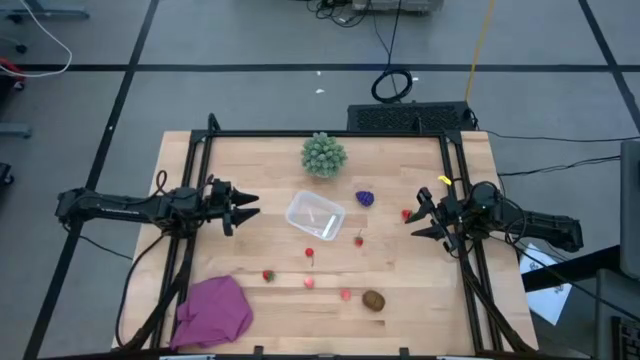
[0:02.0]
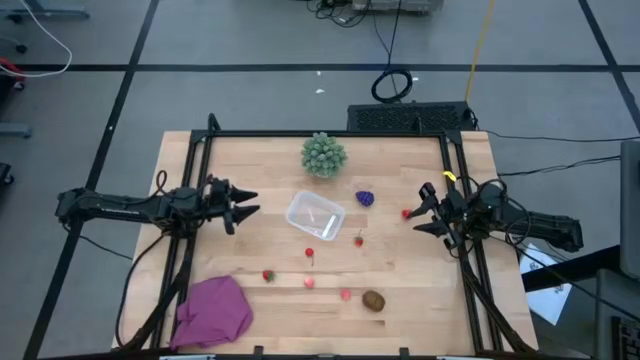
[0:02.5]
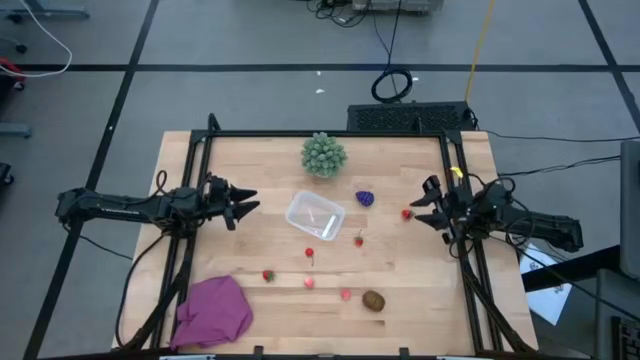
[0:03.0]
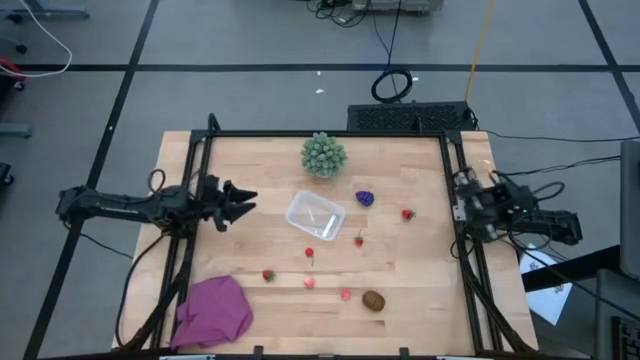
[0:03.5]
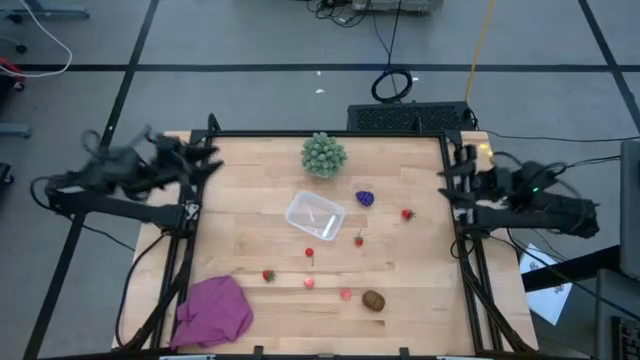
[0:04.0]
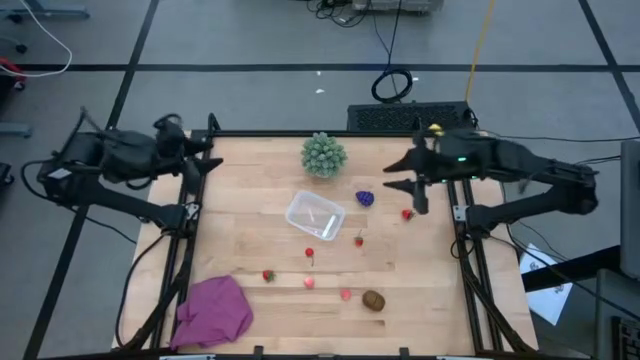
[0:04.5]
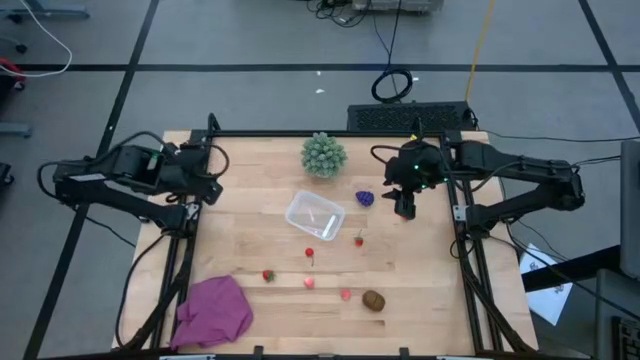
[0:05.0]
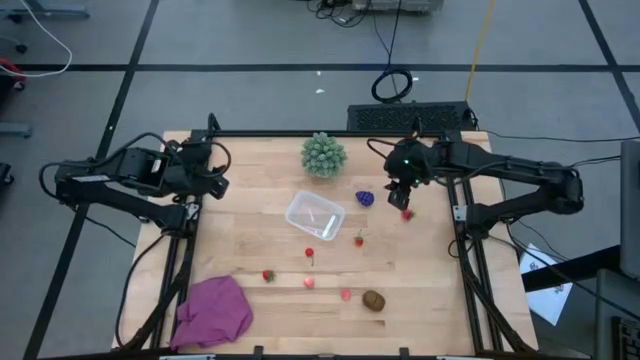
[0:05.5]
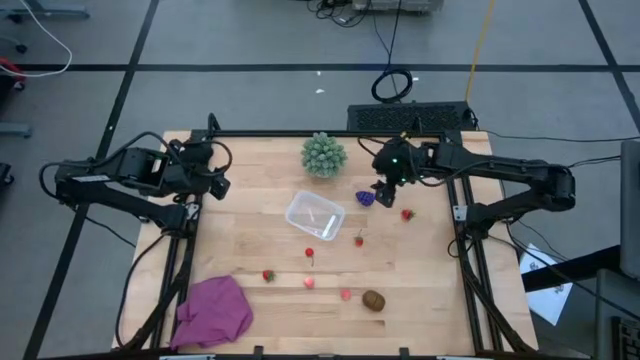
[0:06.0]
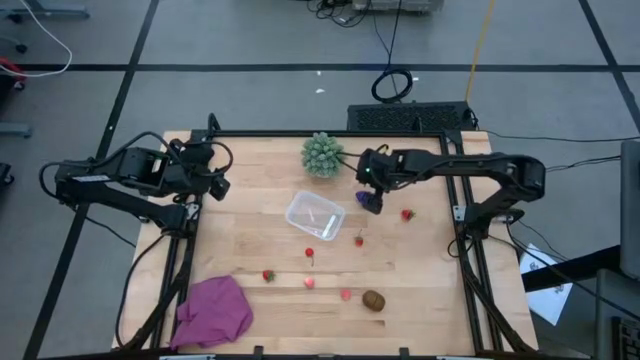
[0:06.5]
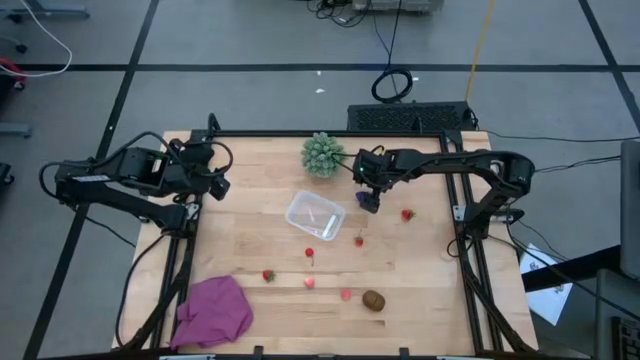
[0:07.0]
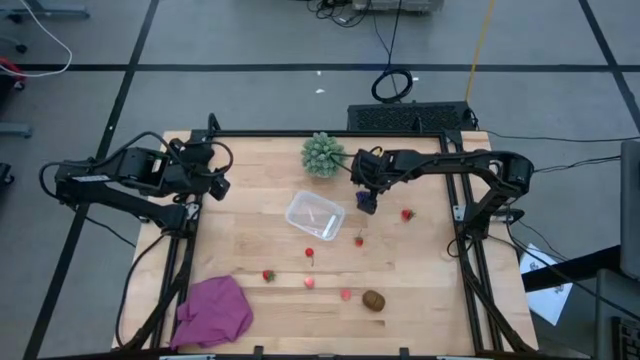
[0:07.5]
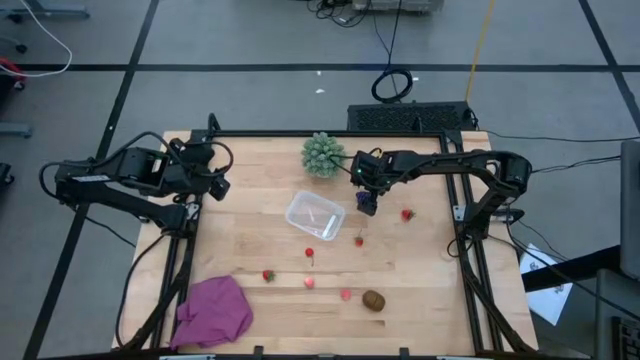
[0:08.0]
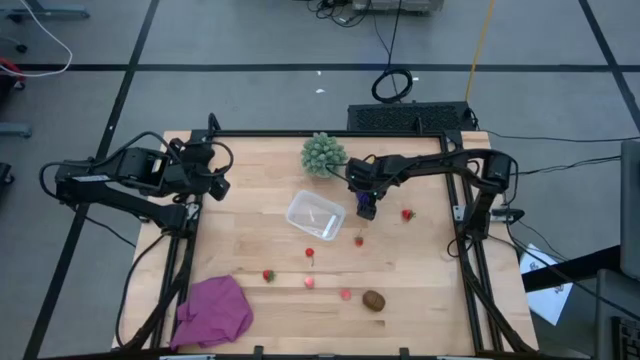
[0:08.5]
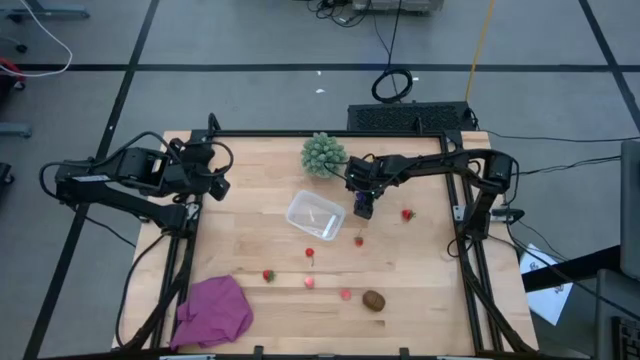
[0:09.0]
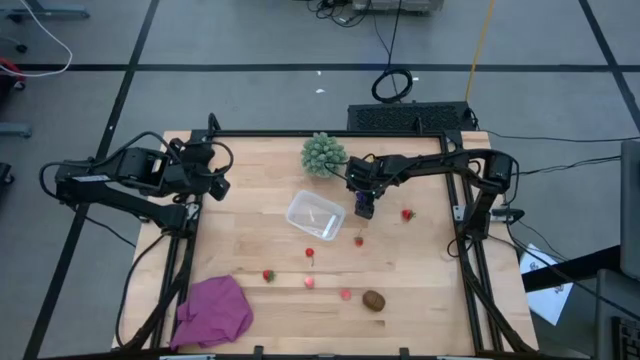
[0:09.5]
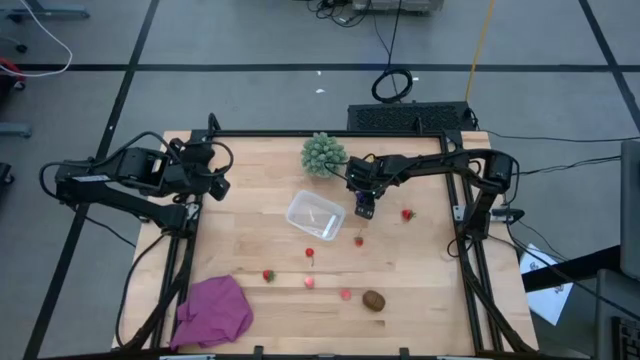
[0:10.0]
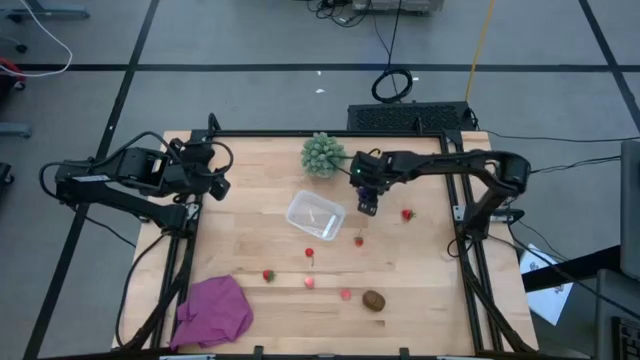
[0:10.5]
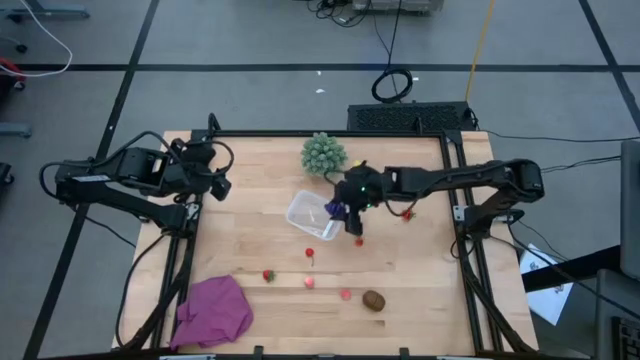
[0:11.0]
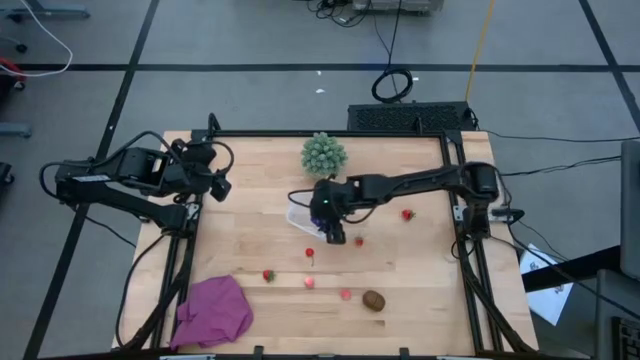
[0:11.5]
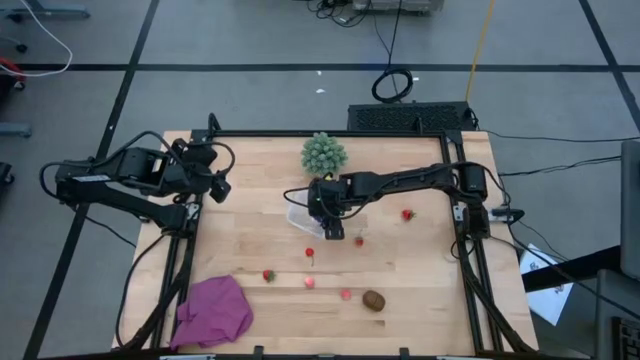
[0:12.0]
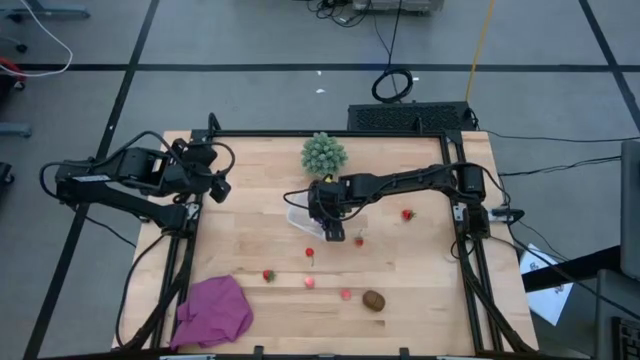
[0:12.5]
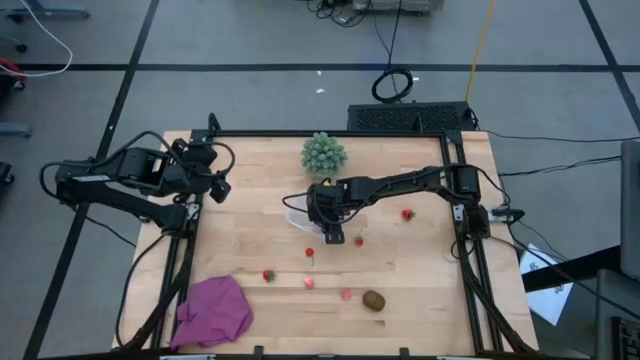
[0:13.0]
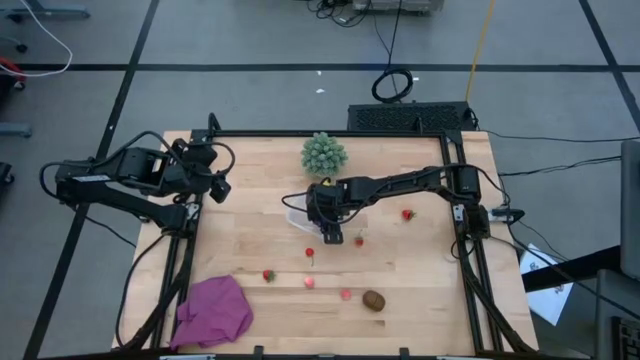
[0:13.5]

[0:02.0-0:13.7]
Task: Pick and placing Produce into tupperware
Put the grape into the transparent bin

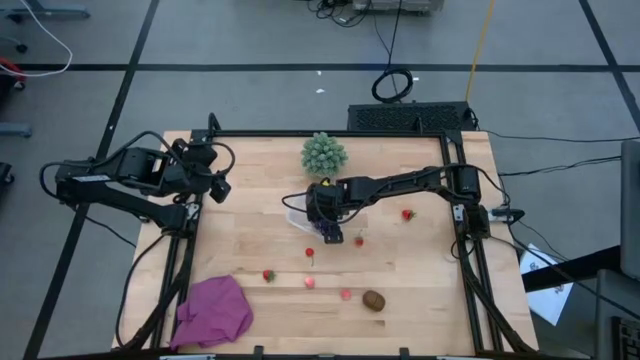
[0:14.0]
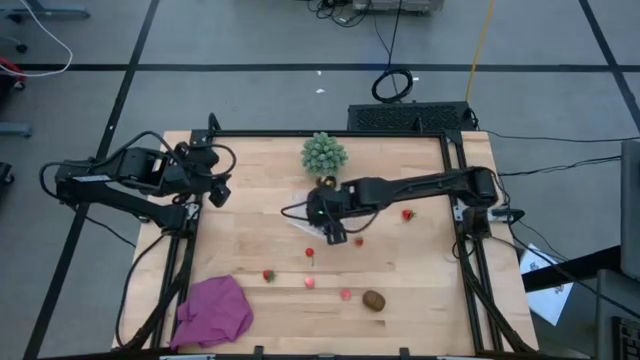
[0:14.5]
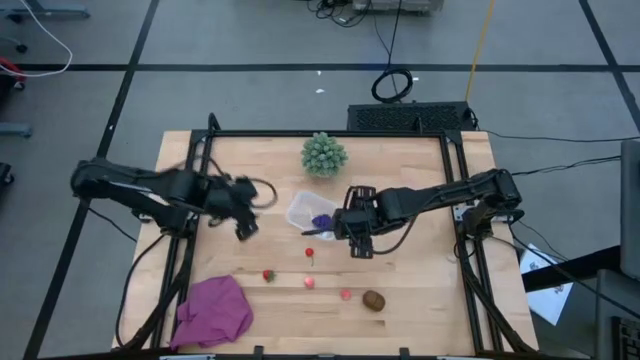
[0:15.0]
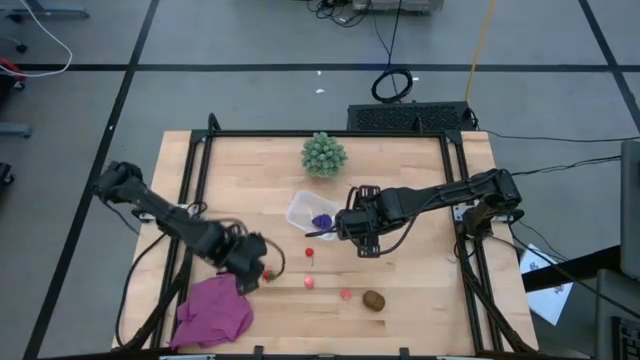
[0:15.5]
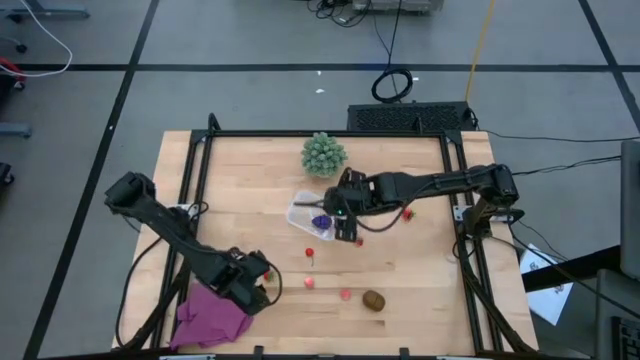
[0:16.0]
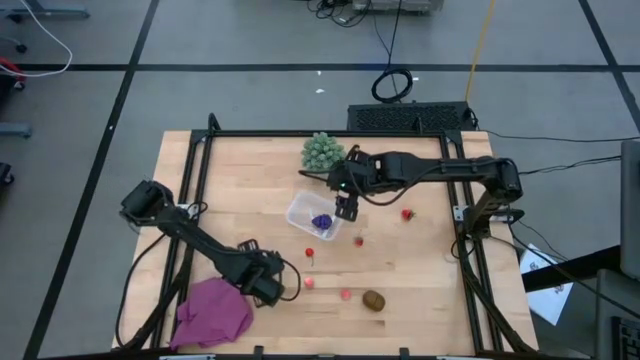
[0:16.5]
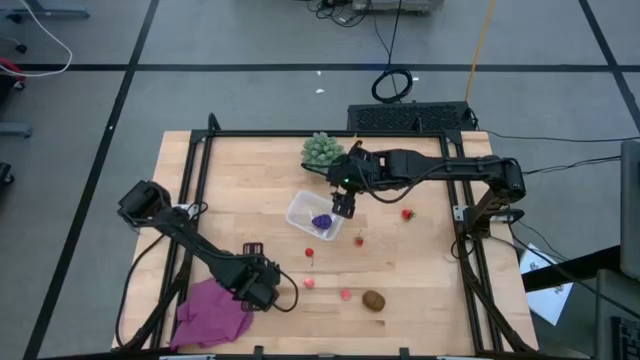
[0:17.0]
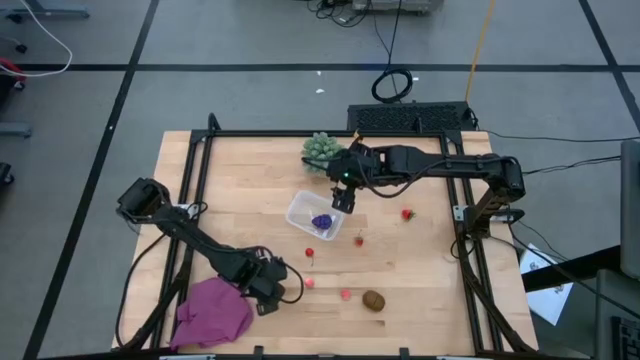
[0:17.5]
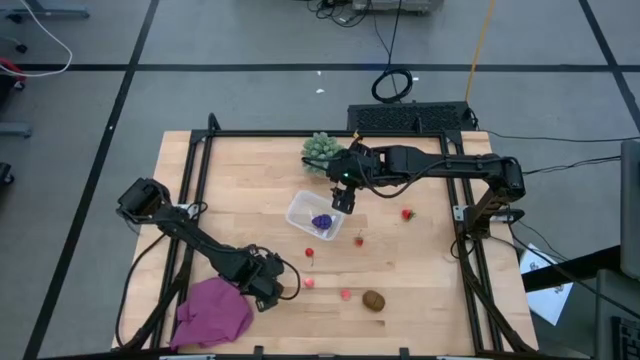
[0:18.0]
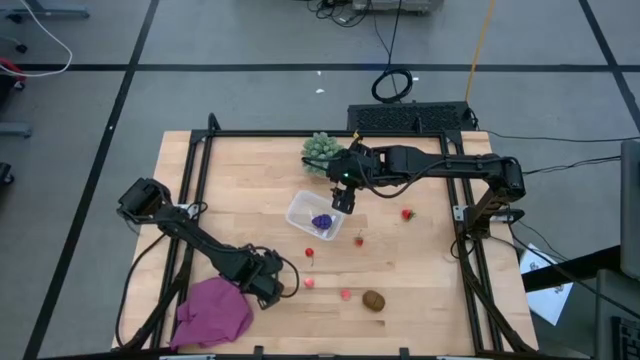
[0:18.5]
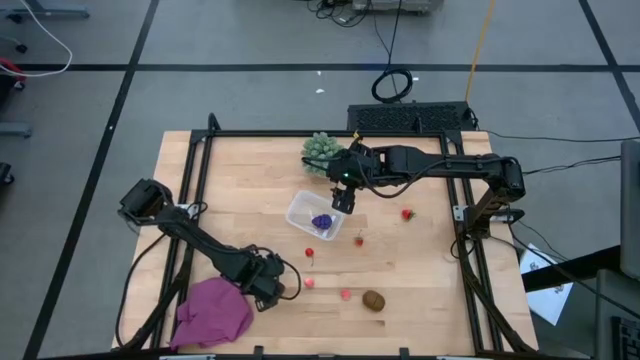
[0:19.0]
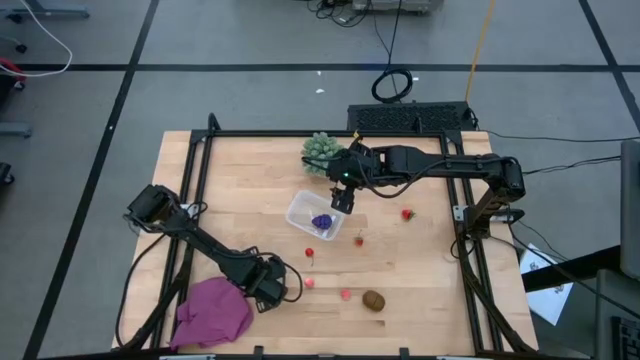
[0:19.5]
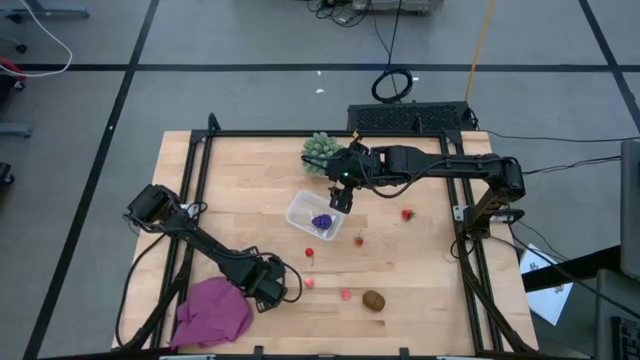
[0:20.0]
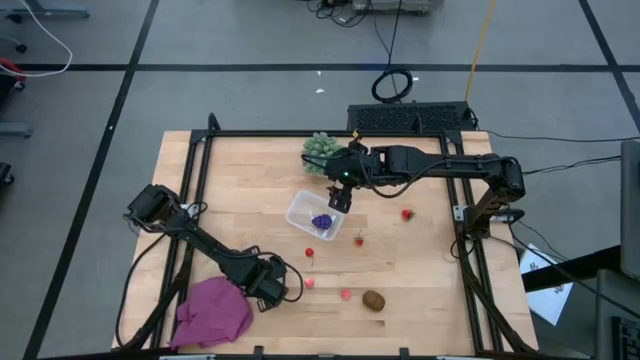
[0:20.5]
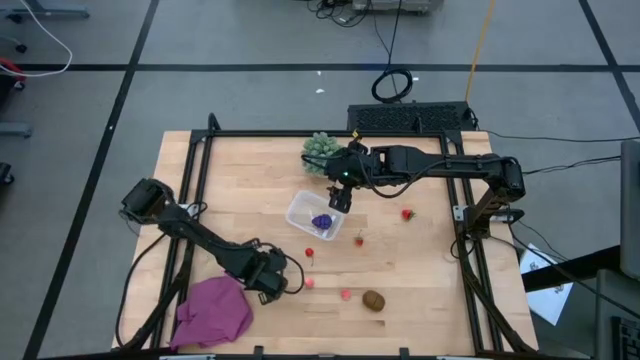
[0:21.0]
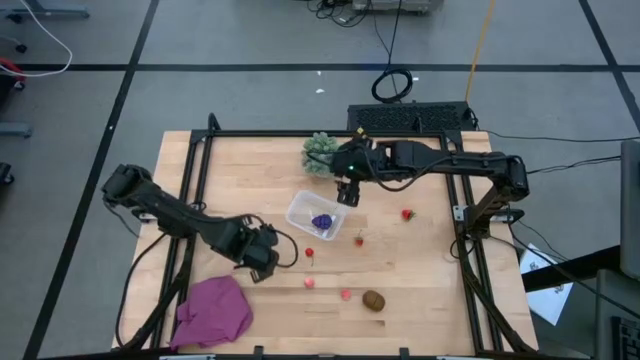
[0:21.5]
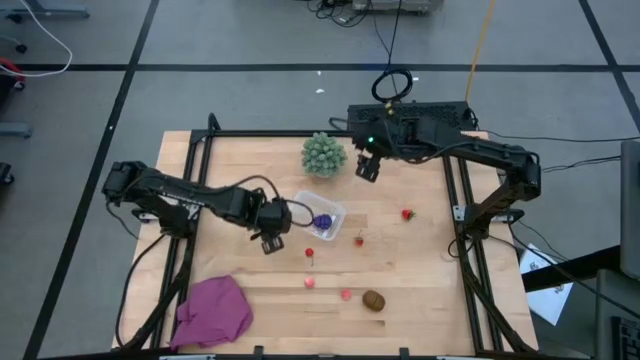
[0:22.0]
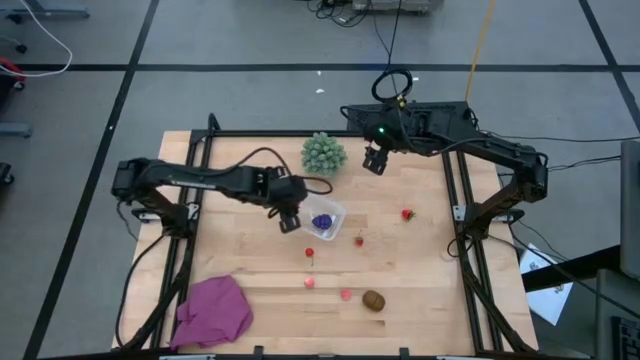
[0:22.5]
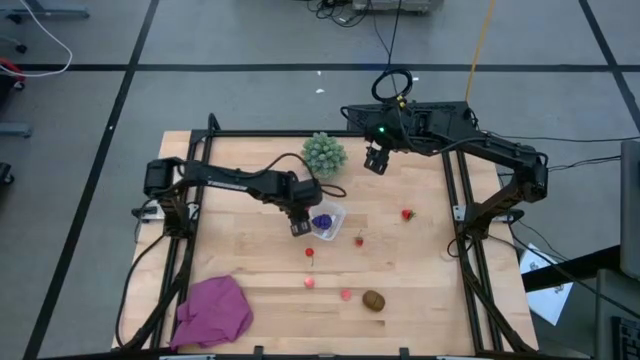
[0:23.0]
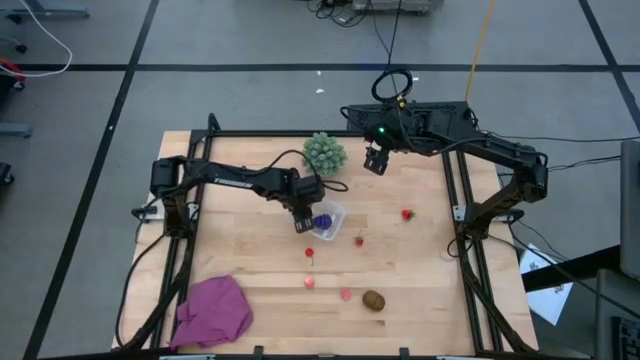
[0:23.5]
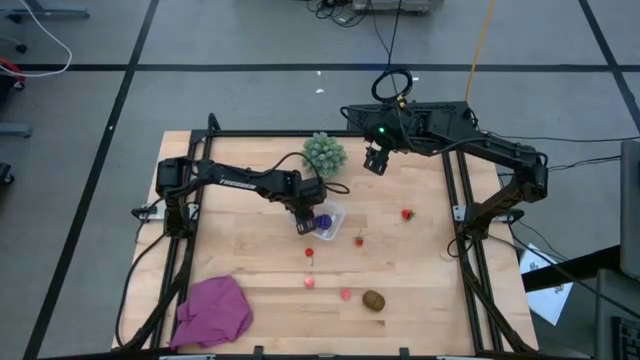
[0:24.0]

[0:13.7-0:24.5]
Put the left strawberry into the transparent bin
